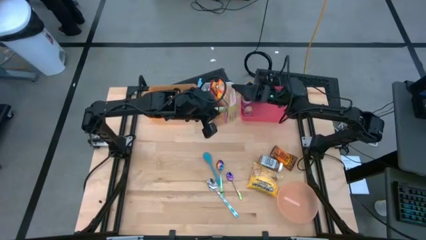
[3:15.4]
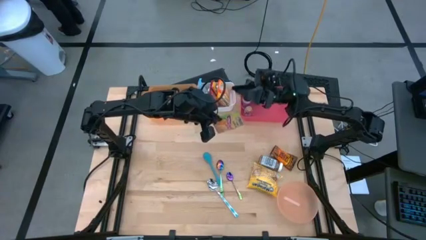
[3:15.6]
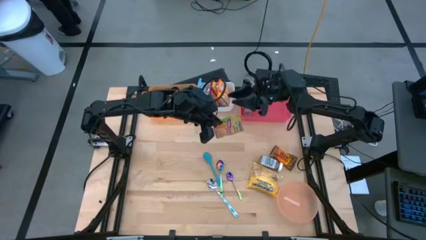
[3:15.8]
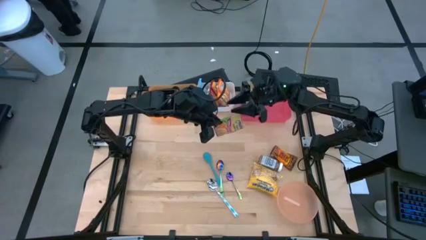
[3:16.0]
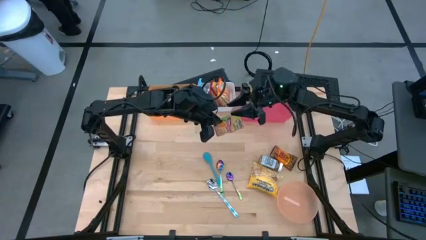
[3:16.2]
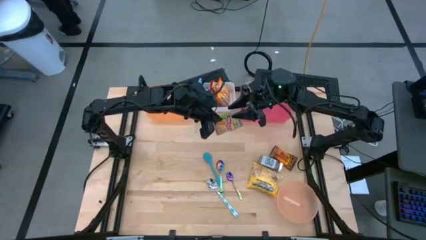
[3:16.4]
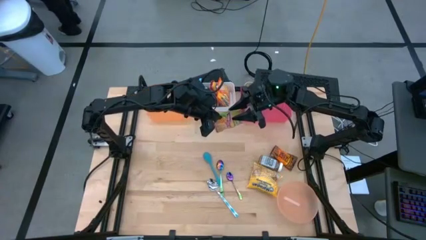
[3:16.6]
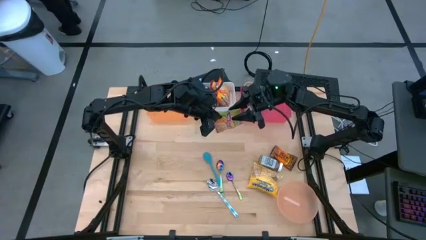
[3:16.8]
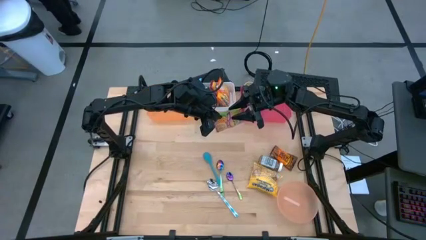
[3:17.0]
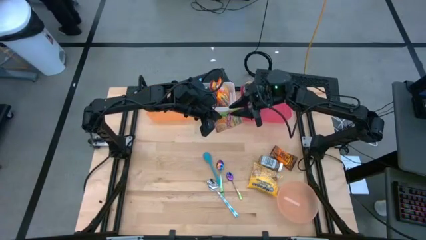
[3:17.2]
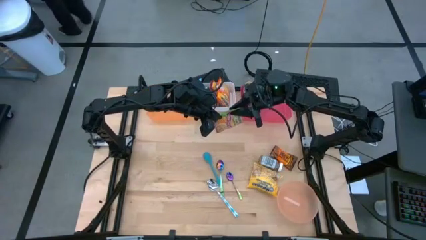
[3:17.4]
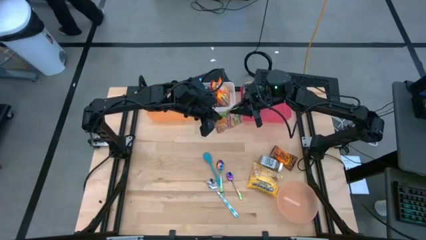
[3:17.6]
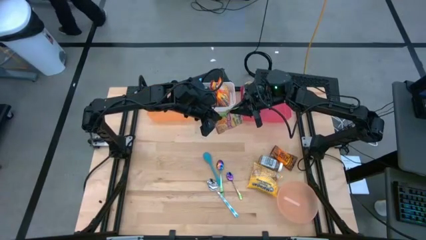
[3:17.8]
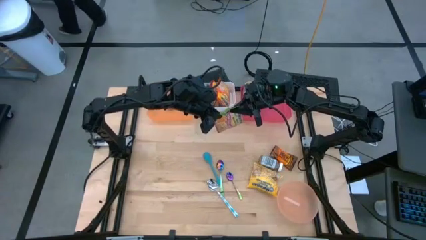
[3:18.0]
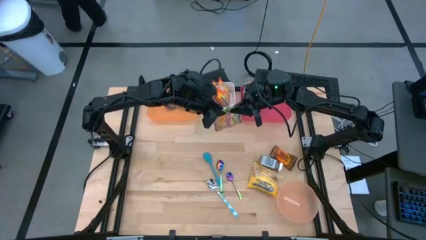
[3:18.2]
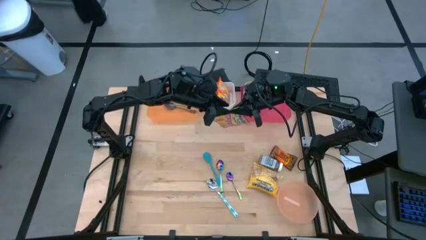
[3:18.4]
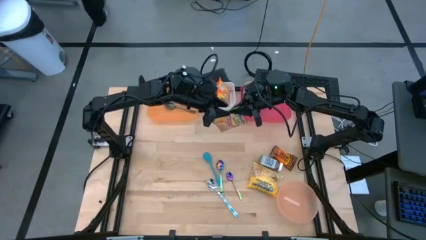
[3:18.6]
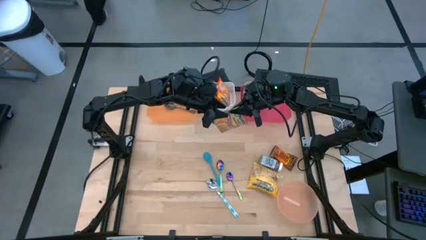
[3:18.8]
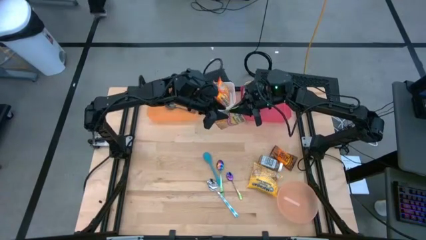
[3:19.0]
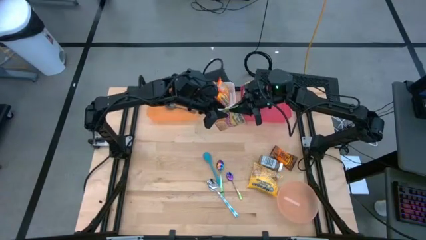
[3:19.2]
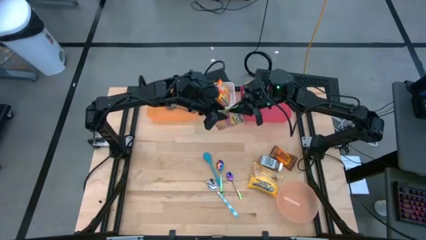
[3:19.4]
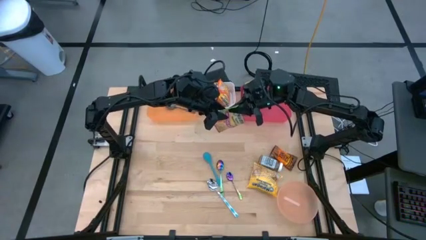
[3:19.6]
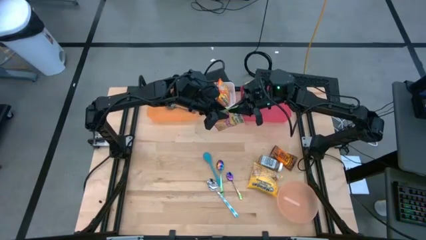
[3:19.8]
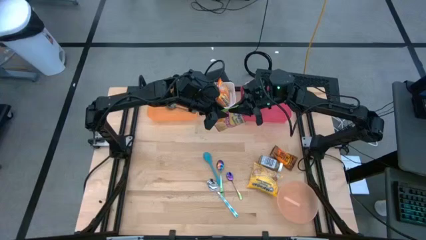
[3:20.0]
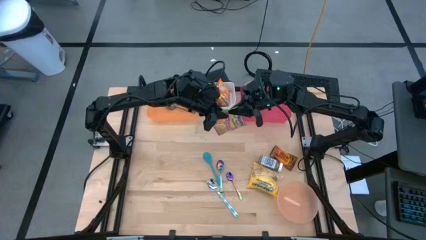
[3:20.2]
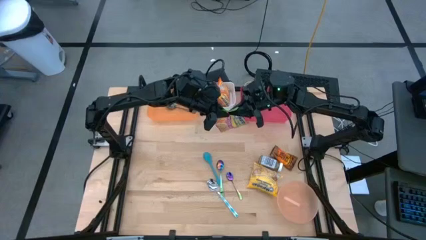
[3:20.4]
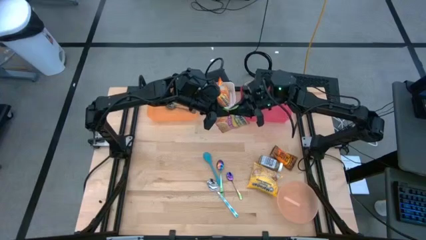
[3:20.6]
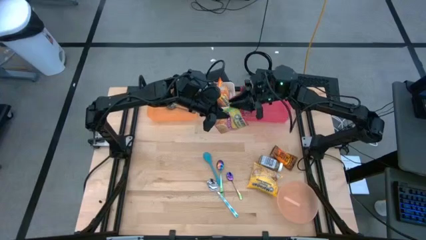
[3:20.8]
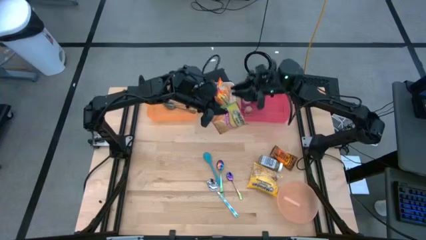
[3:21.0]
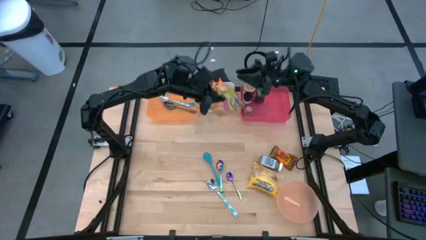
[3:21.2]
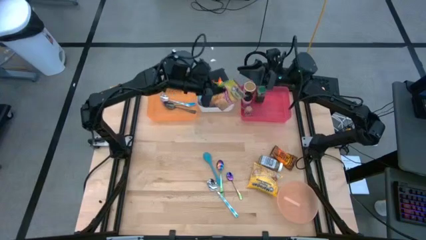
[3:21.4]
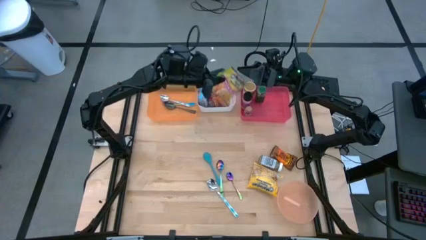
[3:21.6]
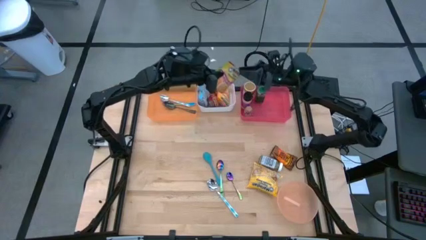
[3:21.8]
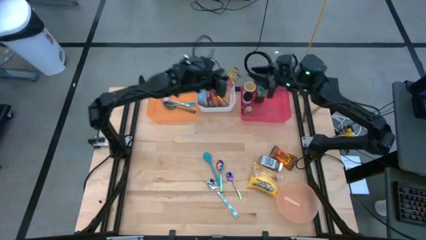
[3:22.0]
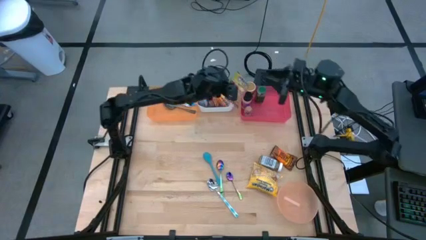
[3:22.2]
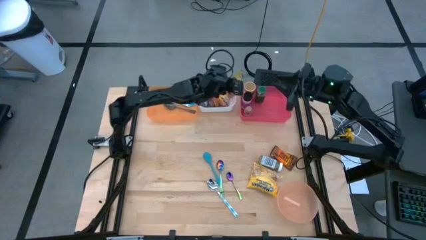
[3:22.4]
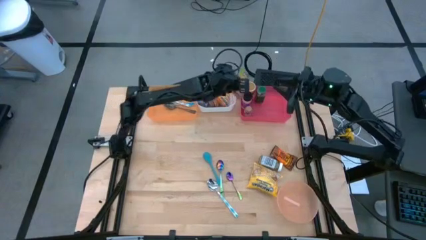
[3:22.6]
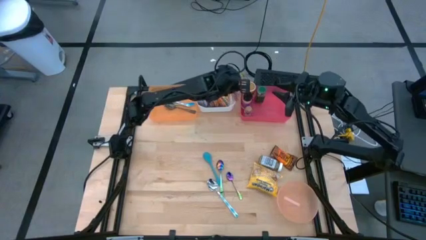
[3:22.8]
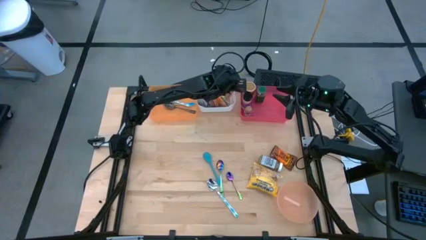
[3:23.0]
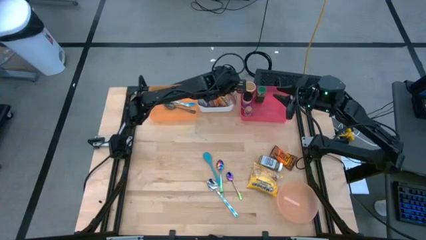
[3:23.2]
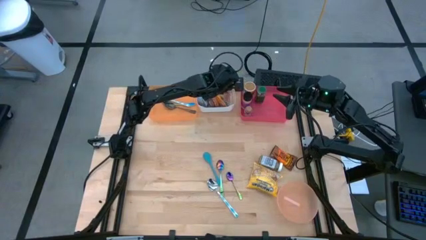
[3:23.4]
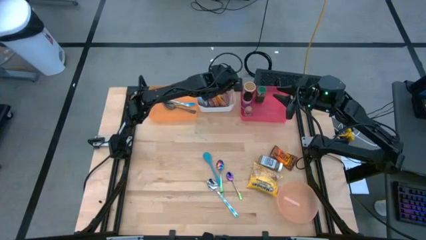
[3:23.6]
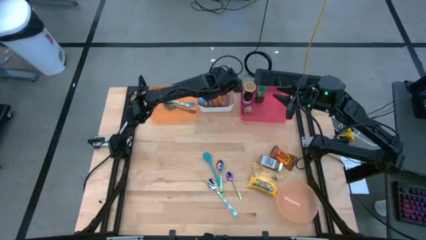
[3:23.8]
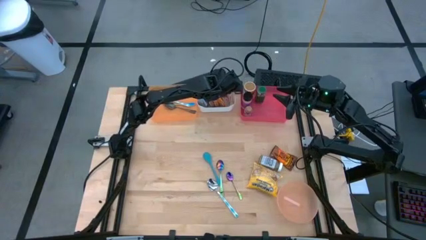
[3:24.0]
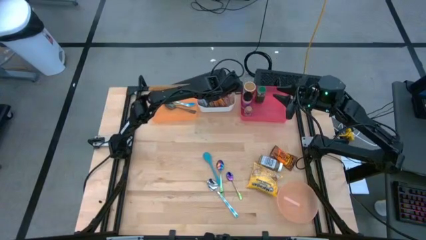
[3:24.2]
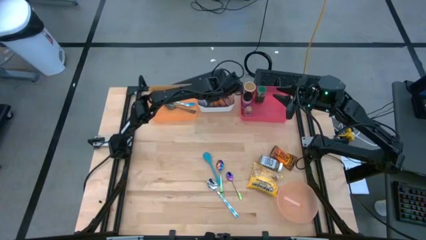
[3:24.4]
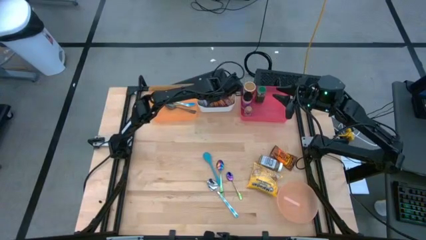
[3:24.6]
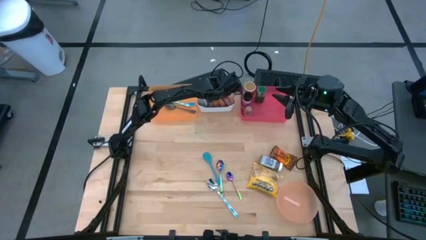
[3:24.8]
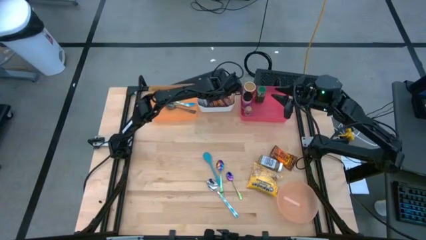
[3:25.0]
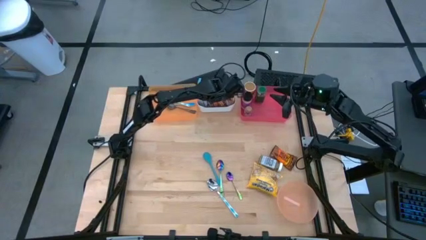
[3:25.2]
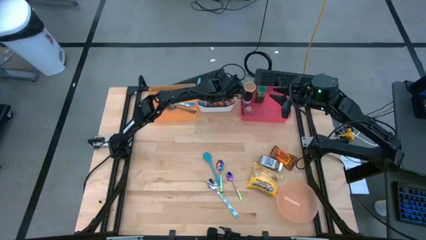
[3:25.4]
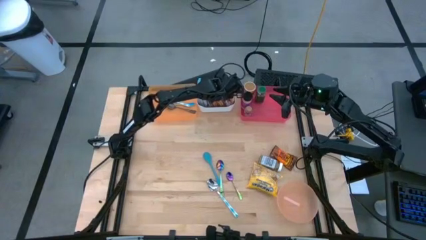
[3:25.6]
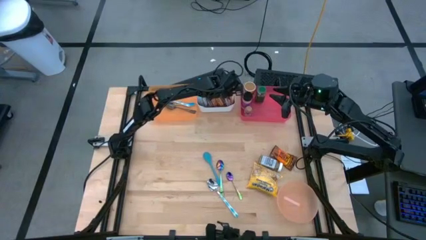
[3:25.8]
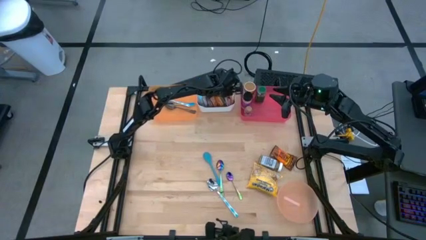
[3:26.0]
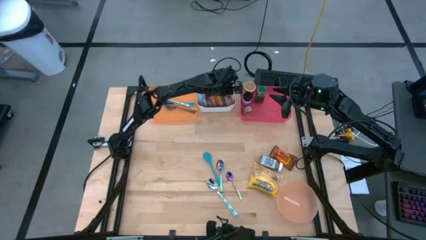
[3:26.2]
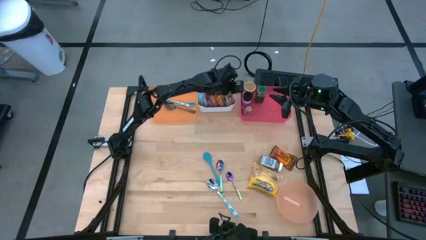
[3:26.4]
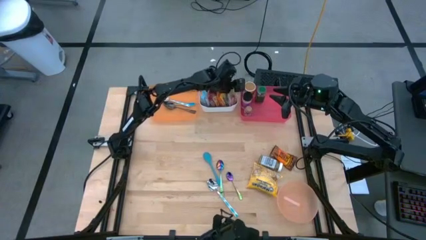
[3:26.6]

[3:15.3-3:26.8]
Task: Pick & Place Food Item
Put the green noodle pack into the white bin
